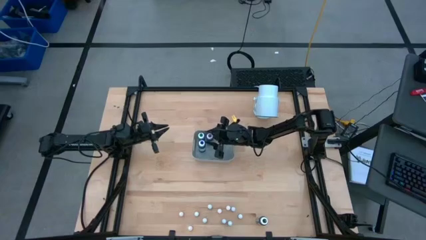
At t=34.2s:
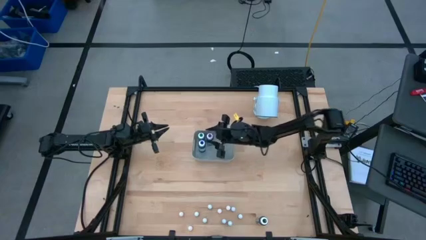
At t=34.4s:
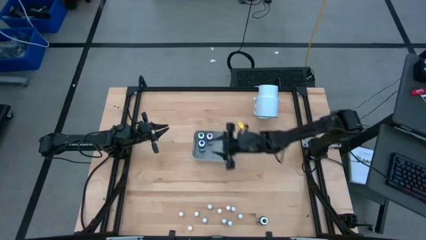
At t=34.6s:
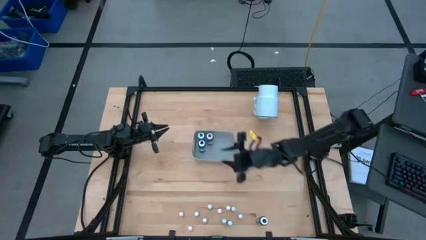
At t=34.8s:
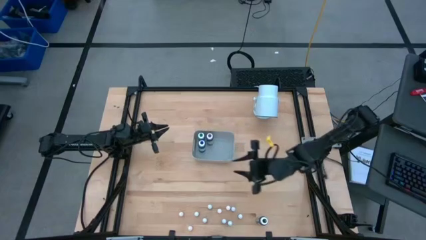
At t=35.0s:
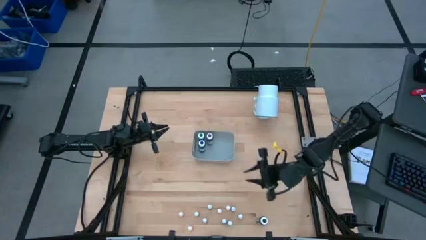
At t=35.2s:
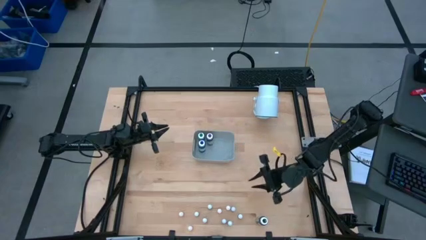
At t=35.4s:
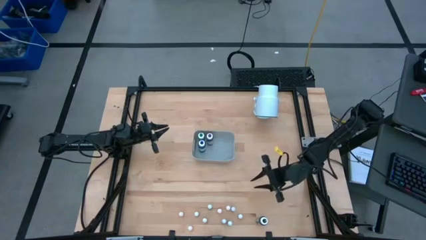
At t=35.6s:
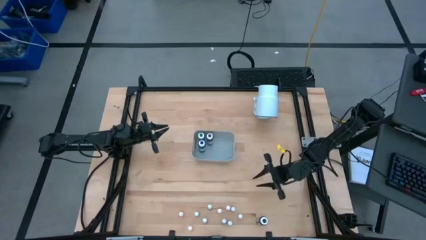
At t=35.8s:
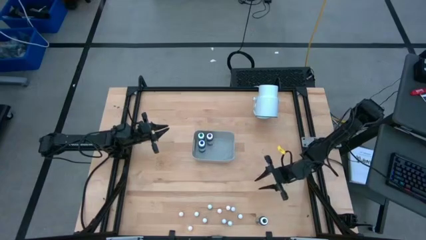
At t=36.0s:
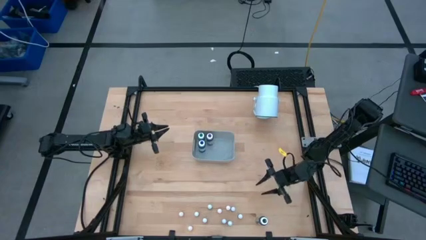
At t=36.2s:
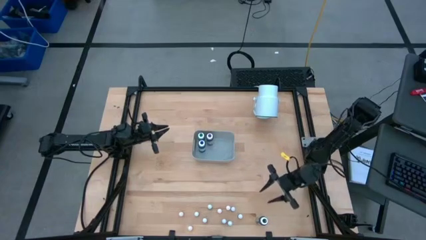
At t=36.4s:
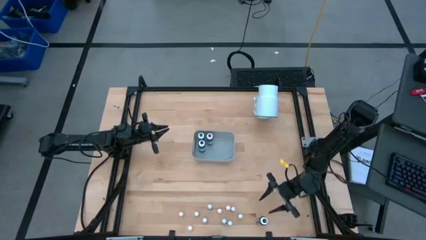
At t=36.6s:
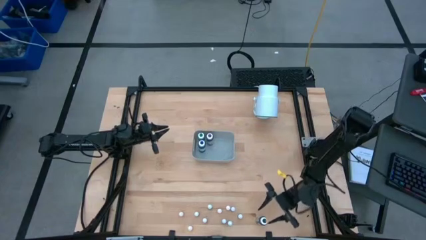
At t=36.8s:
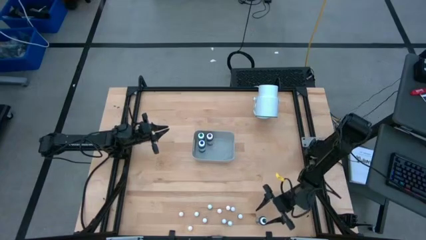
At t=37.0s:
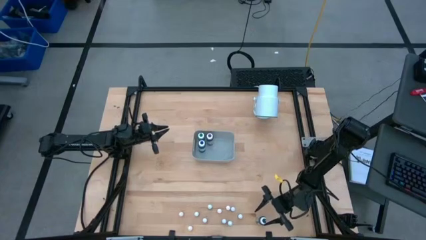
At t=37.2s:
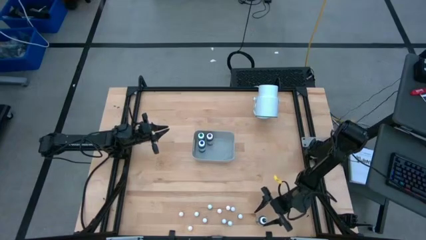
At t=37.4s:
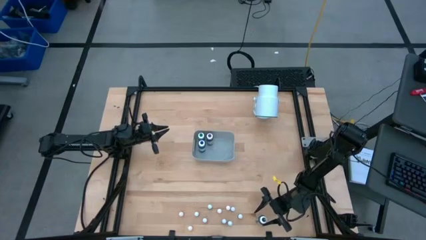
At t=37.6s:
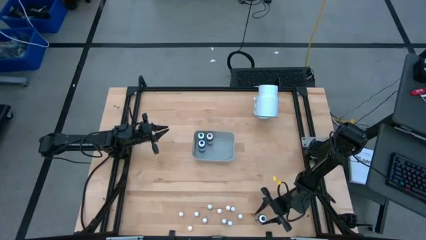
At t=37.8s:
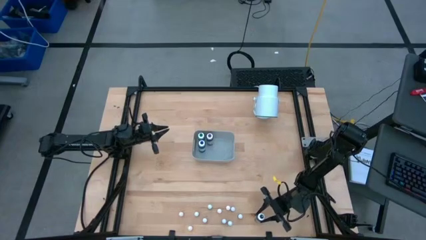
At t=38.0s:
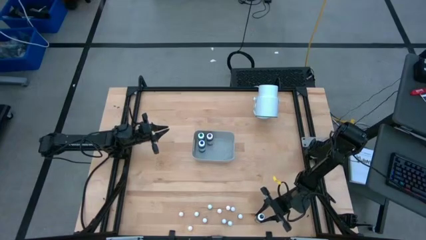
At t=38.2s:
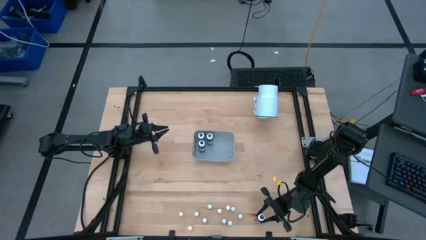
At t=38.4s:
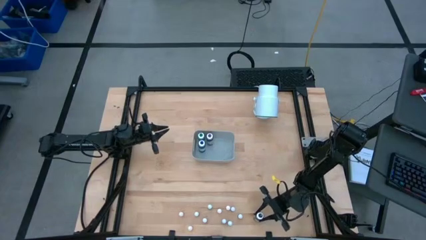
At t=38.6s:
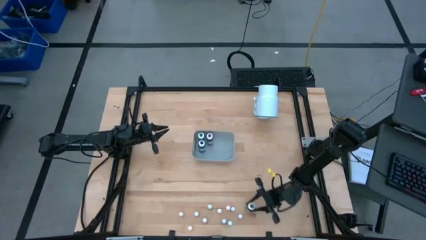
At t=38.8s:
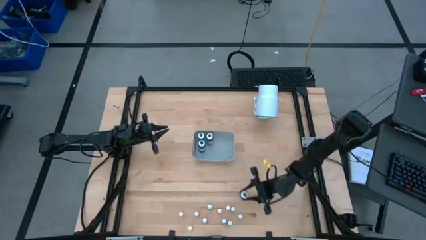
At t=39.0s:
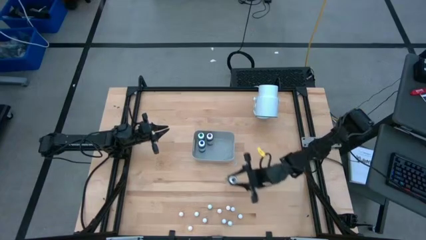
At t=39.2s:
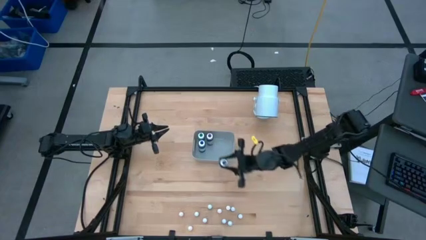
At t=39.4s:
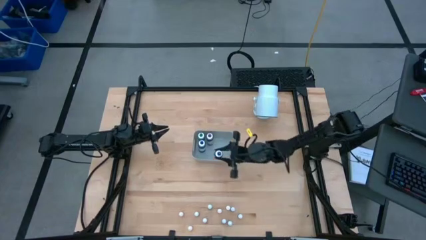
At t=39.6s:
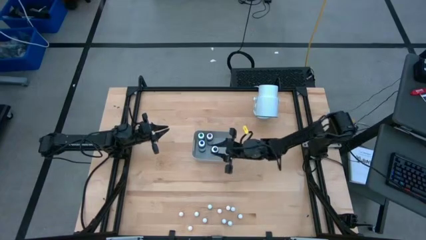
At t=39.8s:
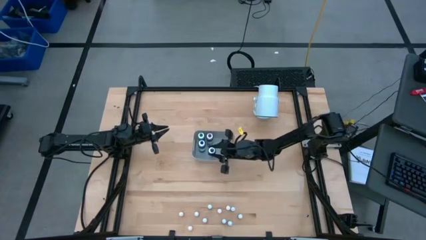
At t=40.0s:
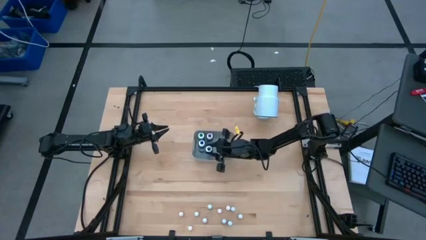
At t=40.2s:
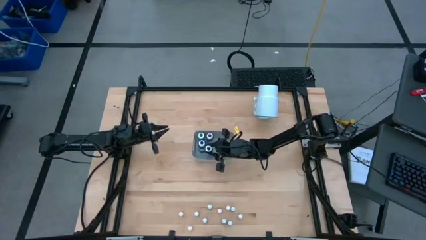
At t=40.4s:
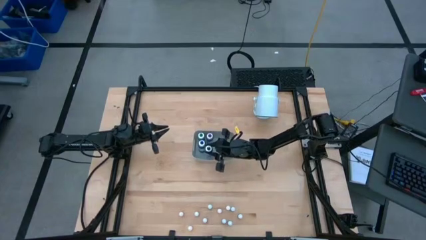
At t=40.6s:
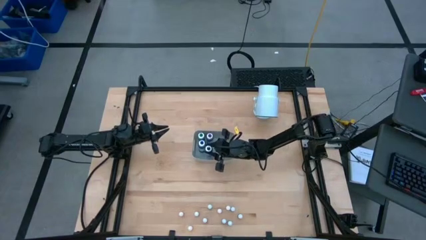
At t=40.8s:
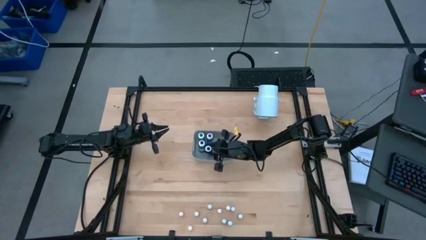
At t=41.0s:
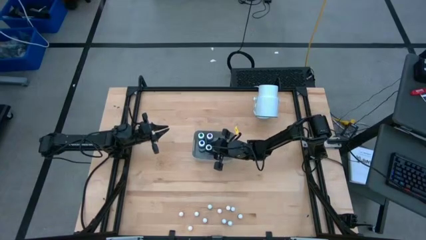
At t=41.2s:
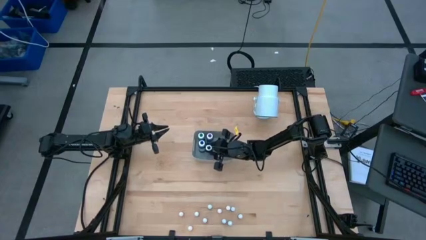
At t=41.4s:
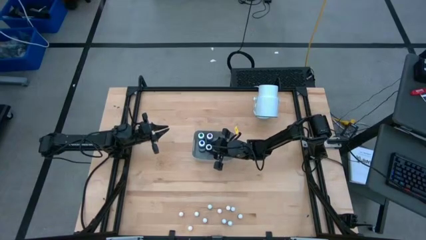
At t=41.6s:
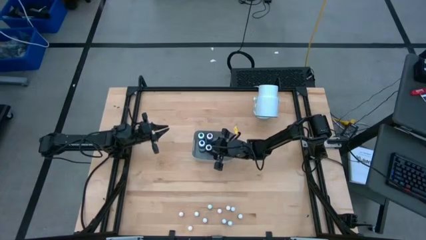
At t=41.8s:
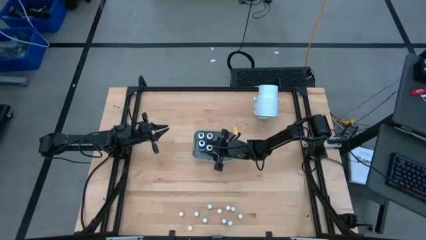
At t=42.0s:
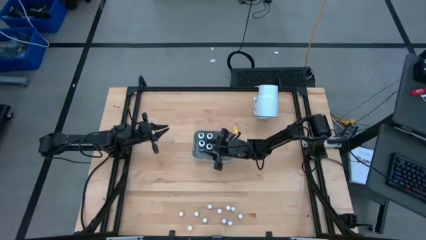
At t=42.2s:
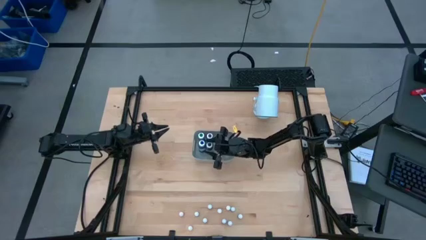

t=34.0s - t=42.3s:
Task: Pick & Place food coloring
Put the big black food coloring bottle into the gray bin

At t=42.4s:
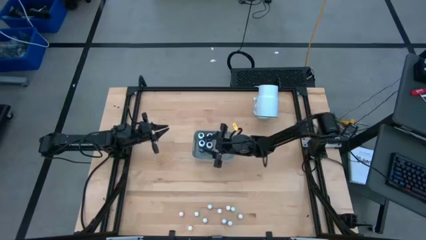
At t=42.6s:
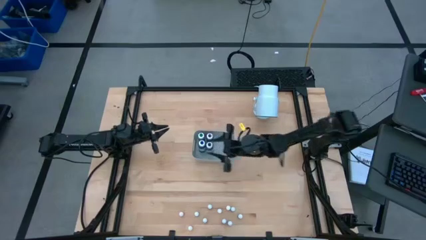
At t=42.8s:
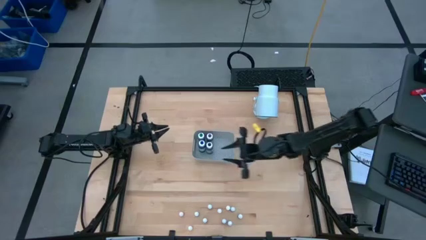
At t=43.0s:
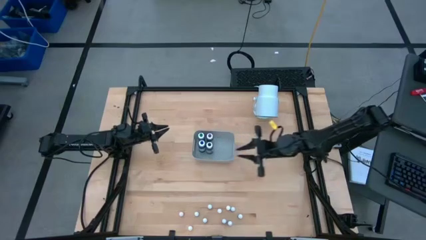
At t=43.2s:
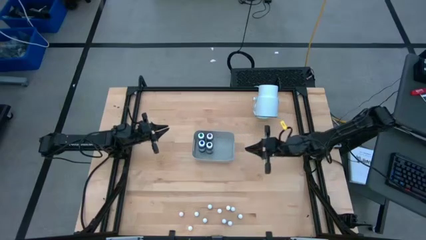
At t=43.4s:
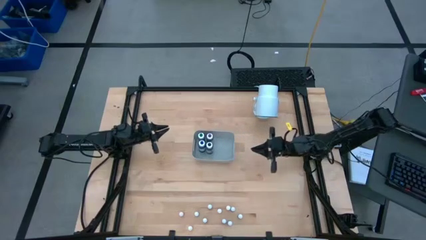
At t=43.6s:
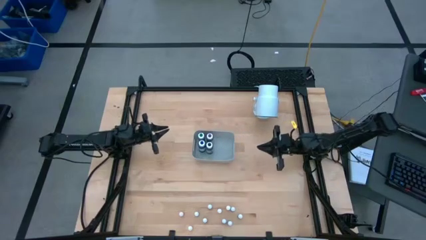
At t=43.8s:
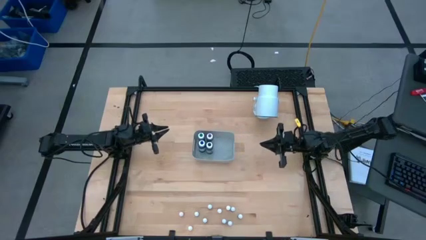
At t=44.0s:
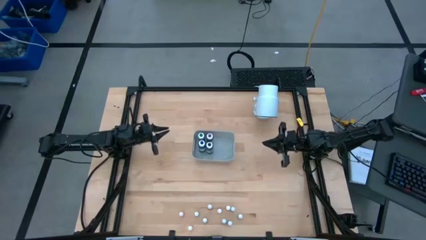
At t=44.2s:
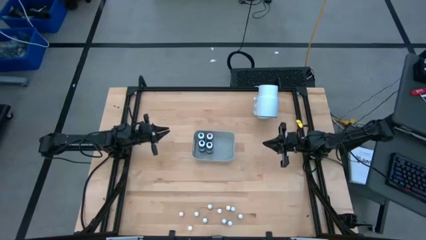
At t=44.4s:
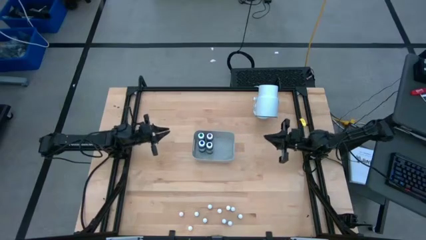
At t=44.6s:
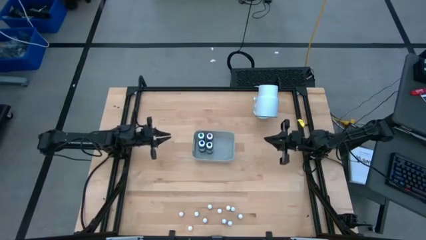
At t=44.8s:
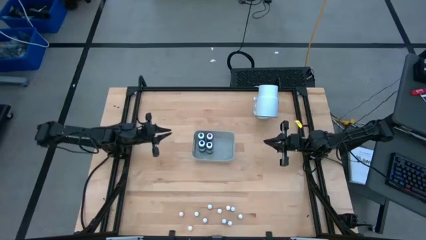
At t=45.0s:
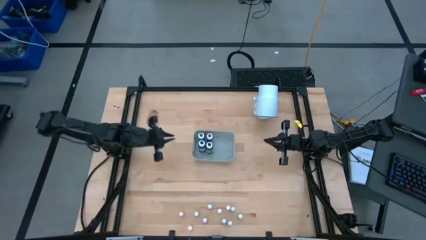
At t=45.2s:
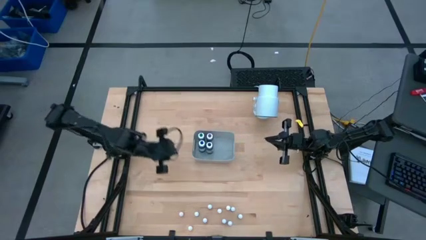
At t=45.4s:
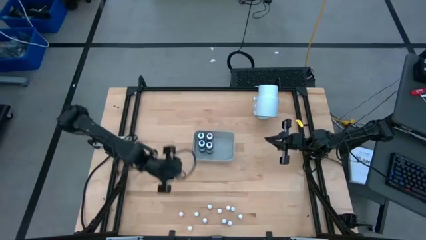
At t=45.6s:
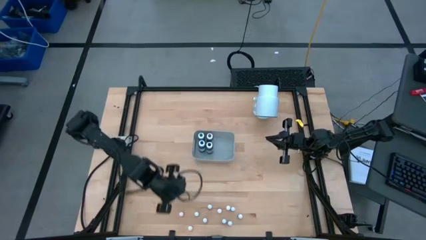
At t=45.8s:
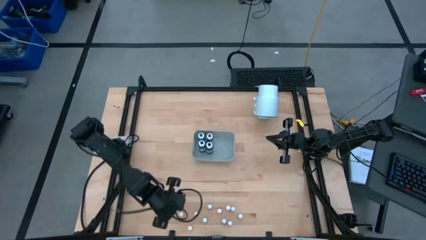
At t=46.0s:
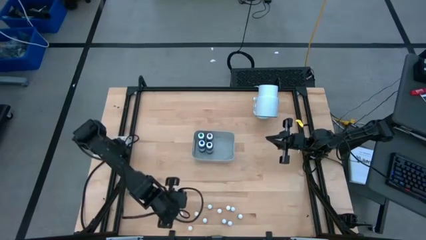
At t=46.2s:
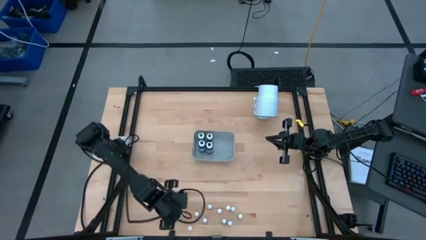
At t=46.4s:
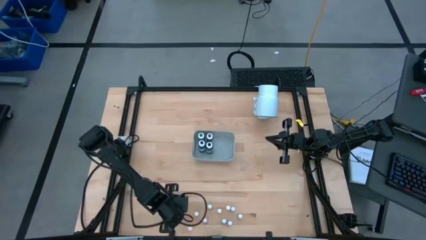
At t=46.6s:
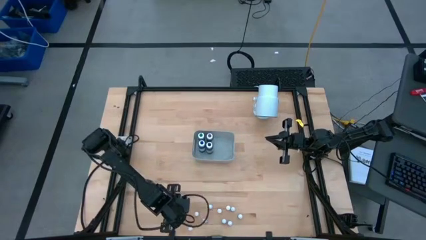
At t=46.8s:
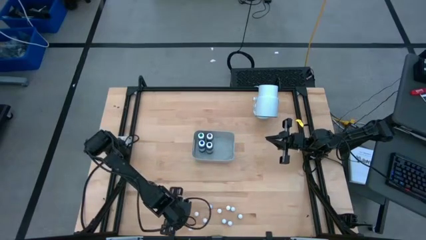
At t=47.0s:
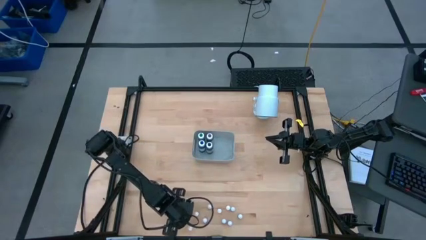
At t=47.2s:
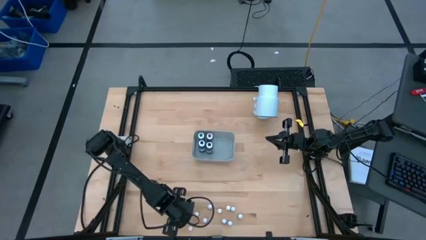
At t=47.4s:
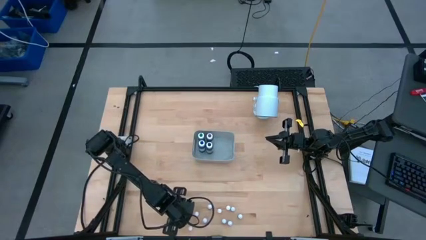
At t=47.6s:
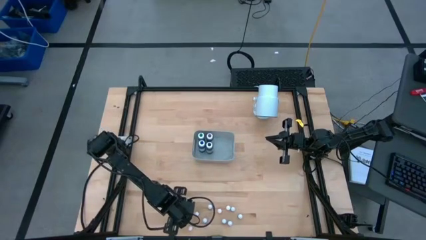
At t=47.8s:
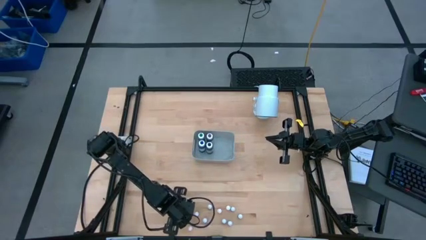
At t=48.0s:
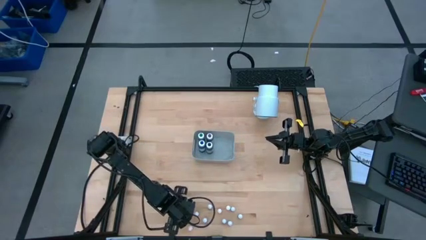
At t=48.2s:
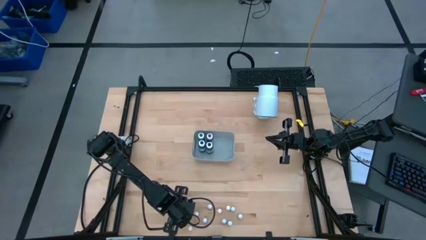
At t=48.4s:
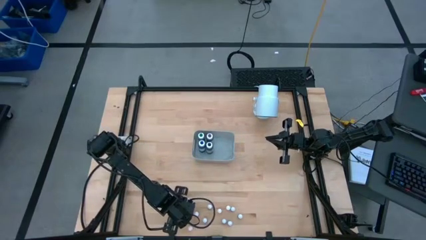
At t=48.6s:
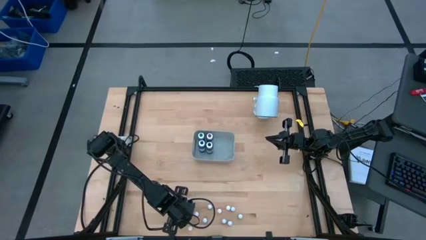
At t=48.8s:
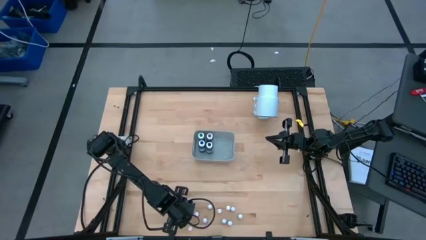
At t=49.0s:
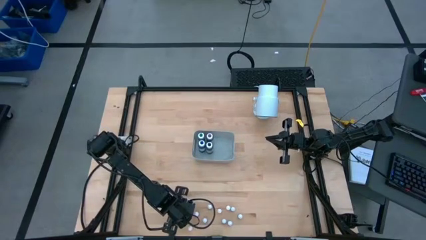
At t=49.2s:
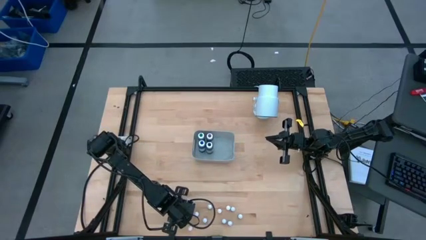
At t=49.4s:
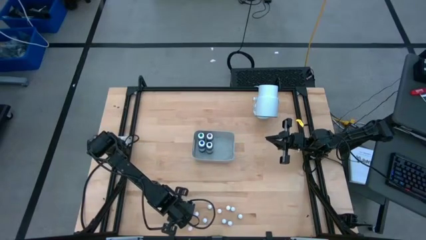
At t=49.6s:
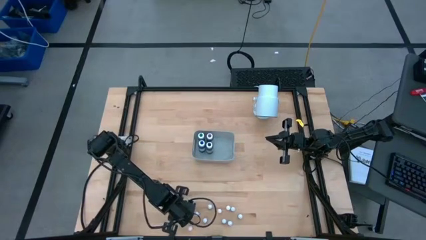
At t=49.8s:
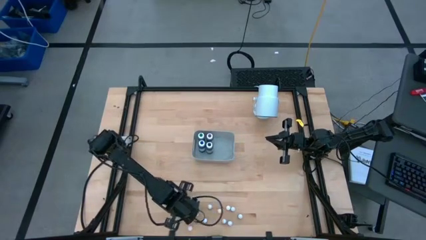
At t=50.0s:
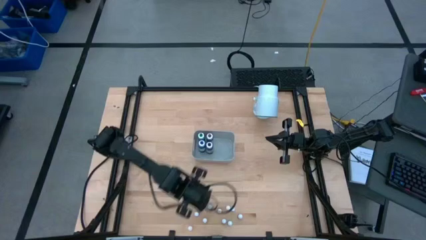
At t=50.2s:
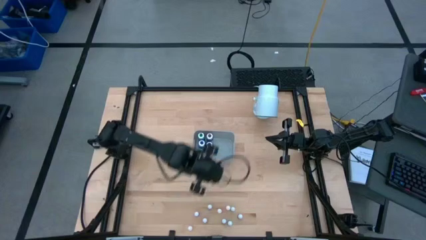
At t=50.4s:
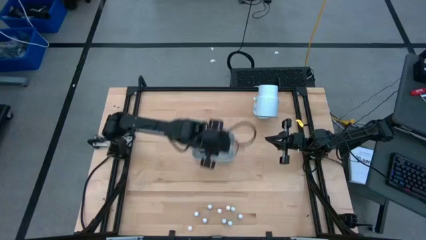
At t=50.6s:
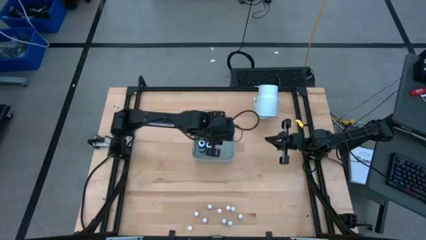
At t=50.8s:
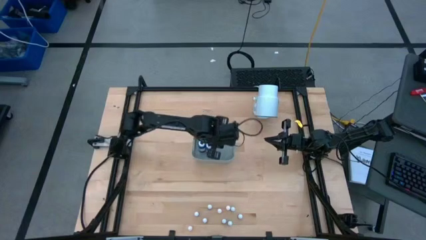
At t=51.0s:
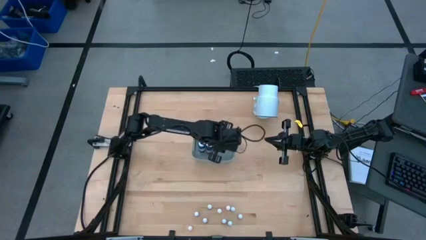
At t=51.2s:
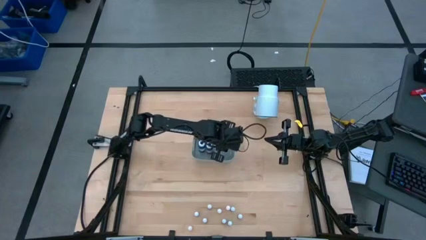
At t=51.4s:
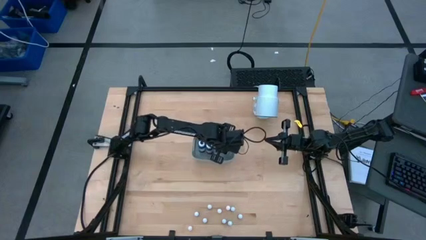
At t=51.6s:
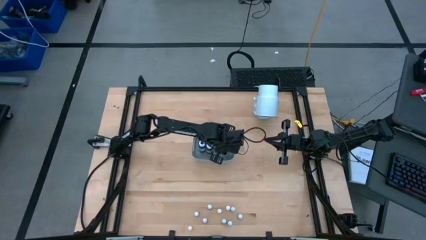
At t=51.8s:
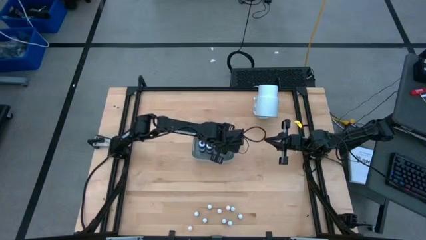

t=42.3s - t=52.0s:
Put the small yellow food coloring bottle into the gray bin
